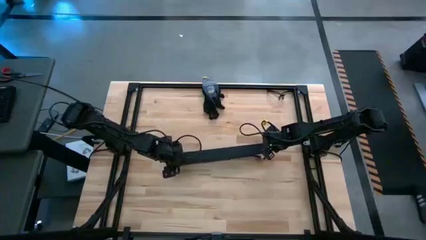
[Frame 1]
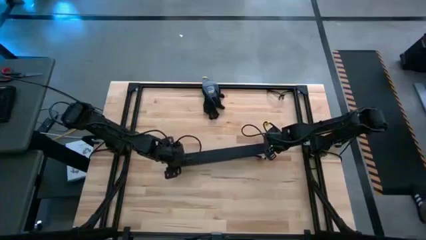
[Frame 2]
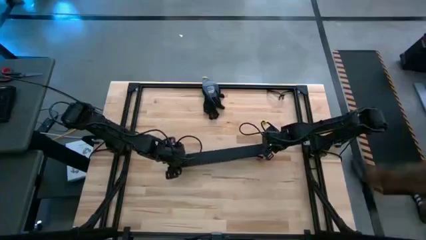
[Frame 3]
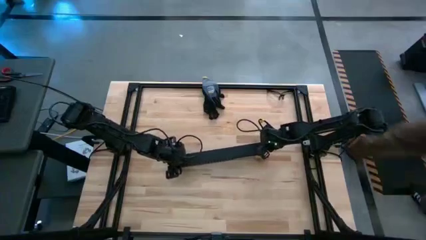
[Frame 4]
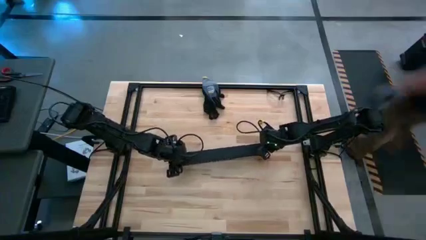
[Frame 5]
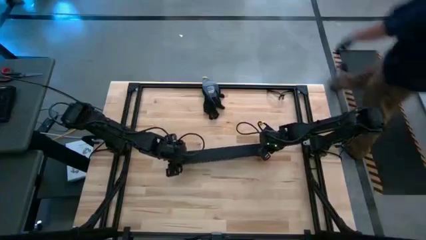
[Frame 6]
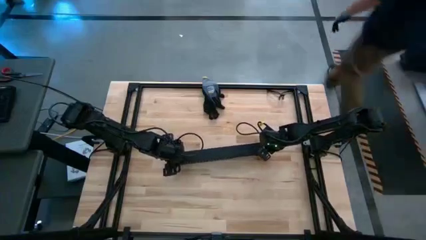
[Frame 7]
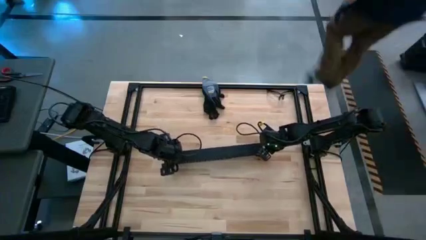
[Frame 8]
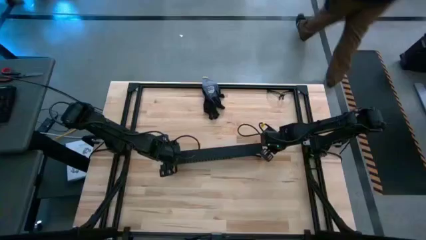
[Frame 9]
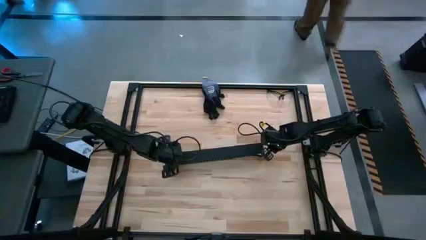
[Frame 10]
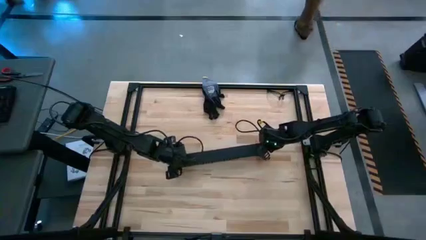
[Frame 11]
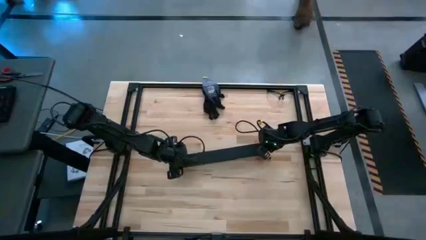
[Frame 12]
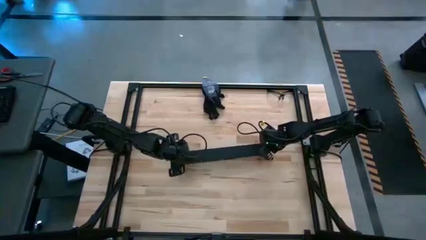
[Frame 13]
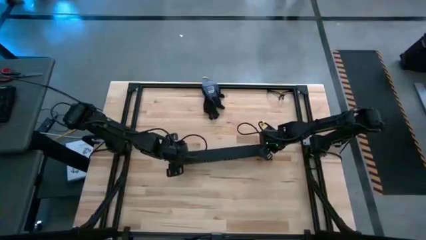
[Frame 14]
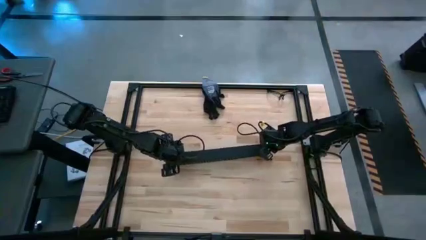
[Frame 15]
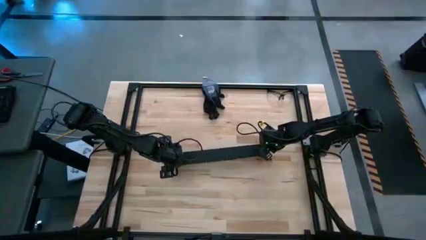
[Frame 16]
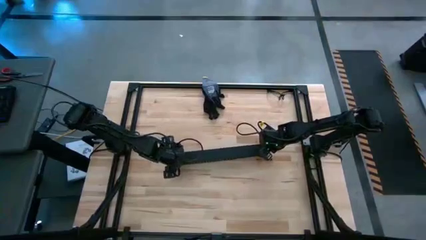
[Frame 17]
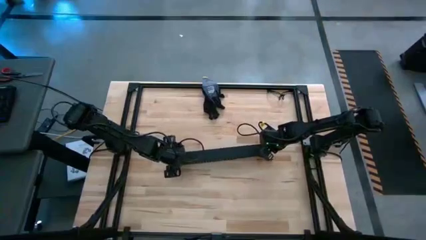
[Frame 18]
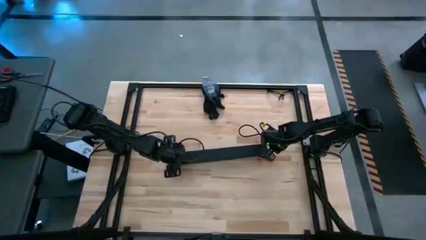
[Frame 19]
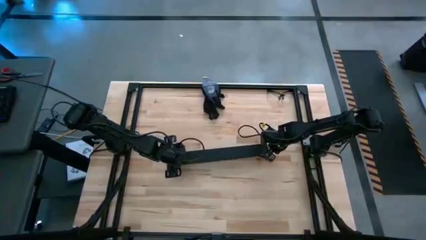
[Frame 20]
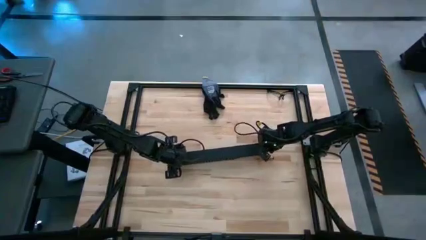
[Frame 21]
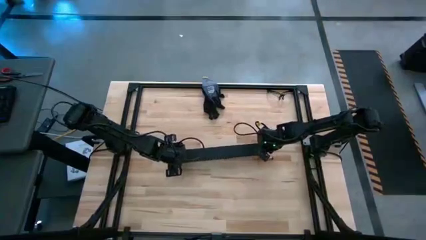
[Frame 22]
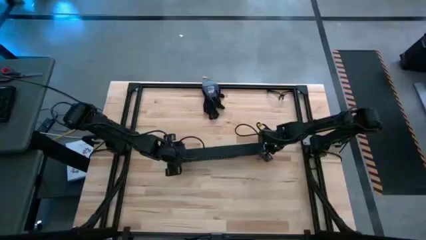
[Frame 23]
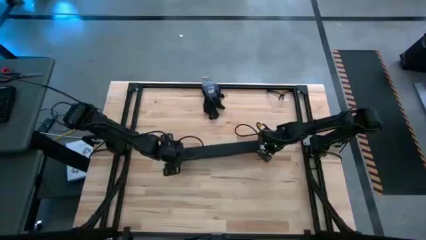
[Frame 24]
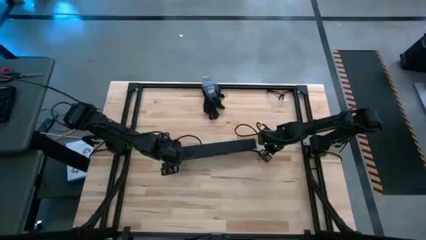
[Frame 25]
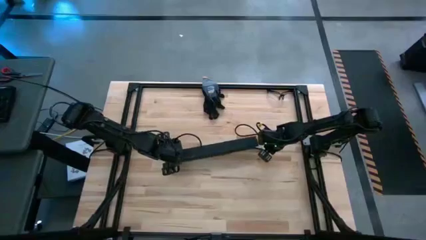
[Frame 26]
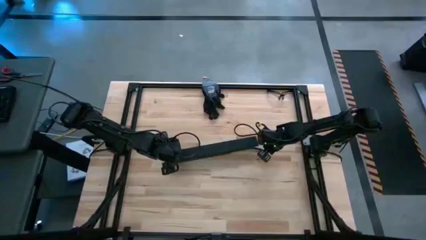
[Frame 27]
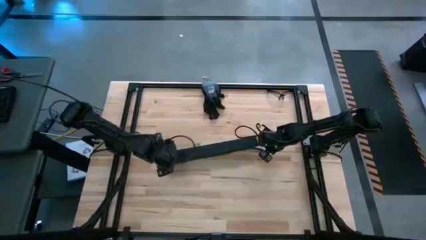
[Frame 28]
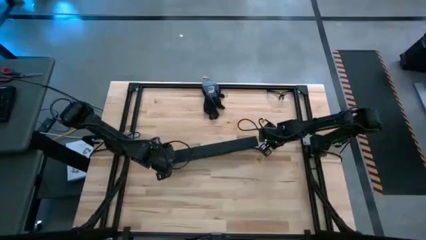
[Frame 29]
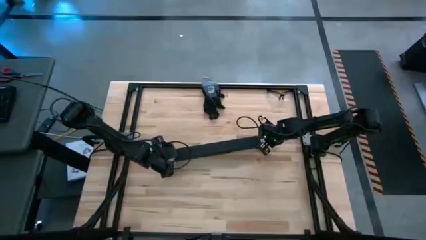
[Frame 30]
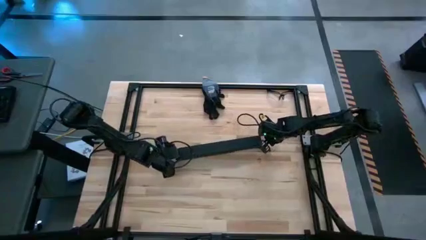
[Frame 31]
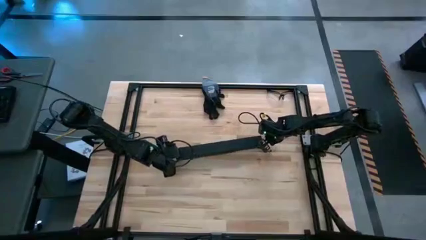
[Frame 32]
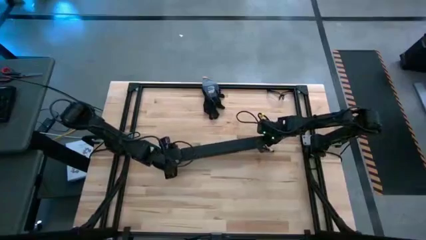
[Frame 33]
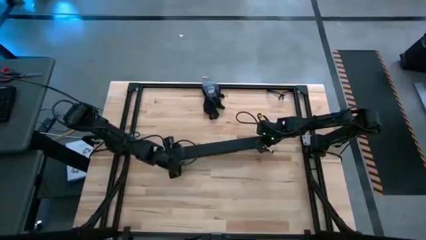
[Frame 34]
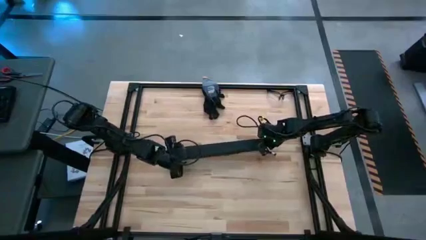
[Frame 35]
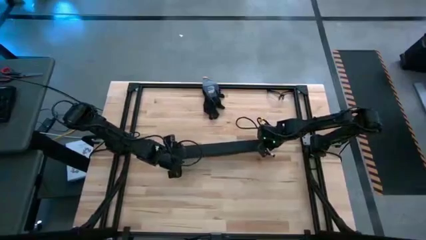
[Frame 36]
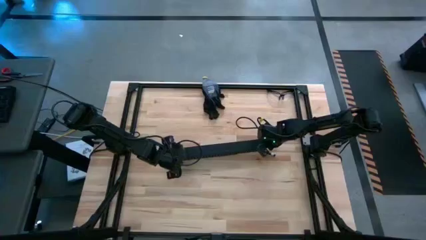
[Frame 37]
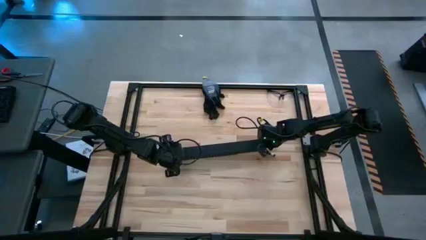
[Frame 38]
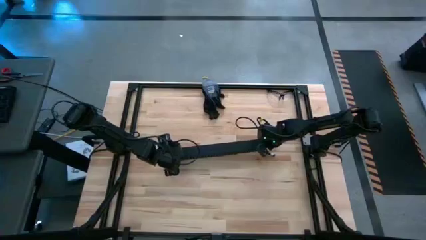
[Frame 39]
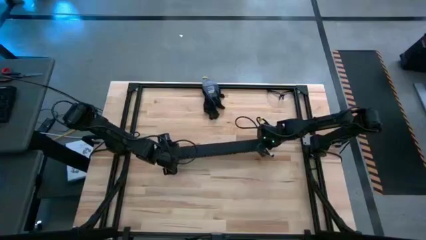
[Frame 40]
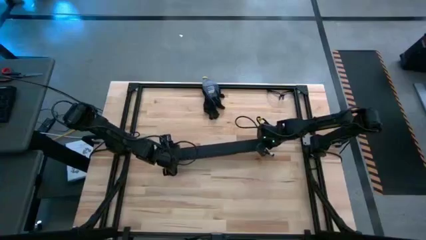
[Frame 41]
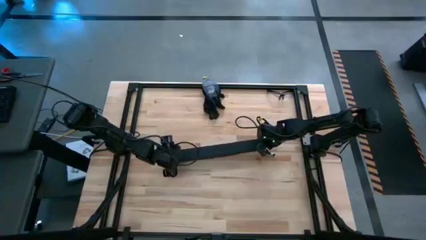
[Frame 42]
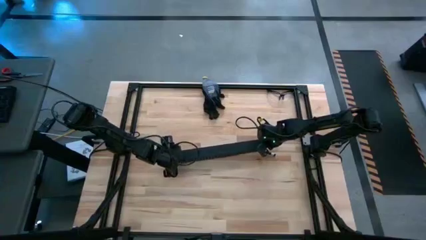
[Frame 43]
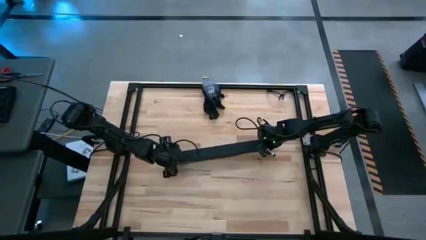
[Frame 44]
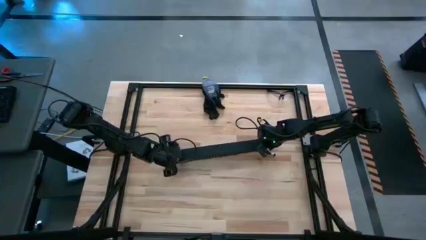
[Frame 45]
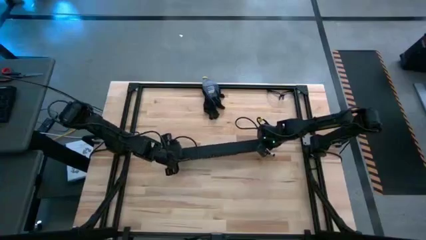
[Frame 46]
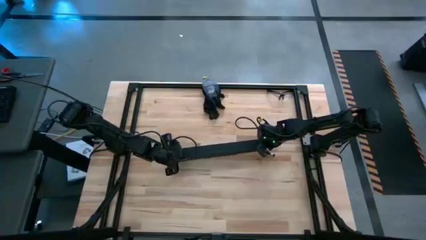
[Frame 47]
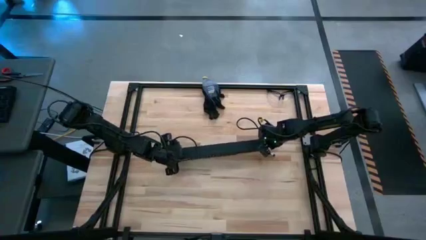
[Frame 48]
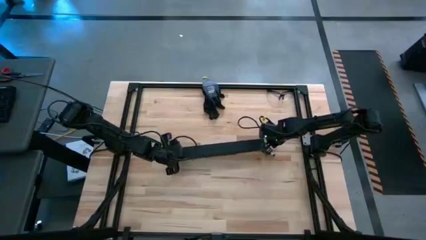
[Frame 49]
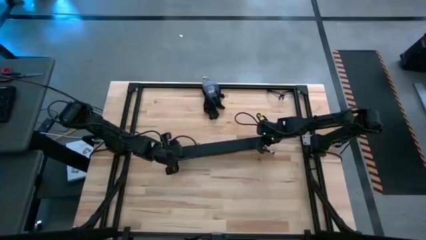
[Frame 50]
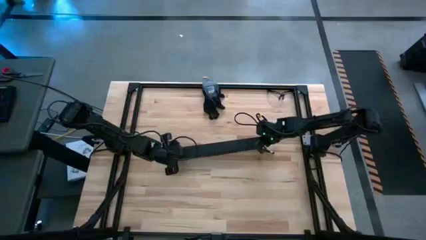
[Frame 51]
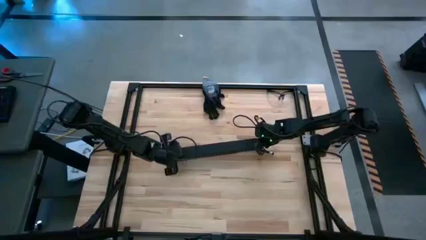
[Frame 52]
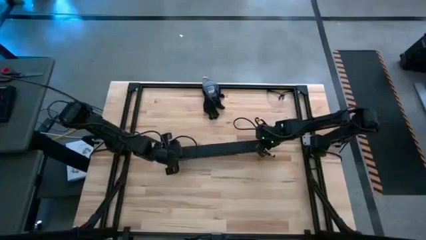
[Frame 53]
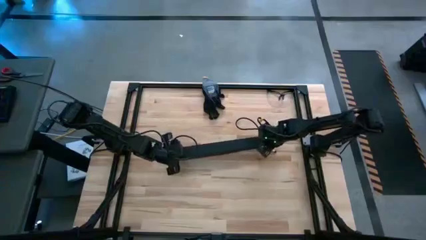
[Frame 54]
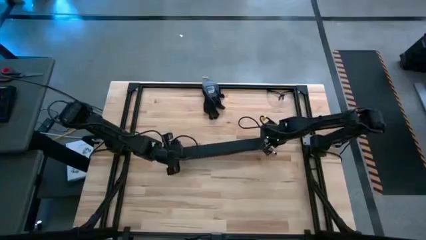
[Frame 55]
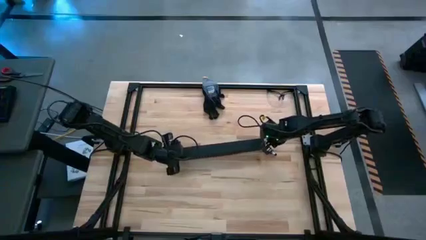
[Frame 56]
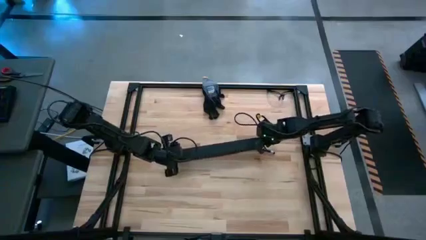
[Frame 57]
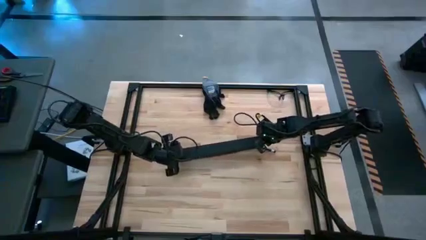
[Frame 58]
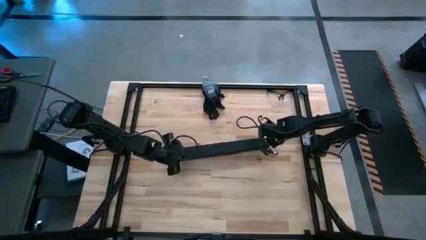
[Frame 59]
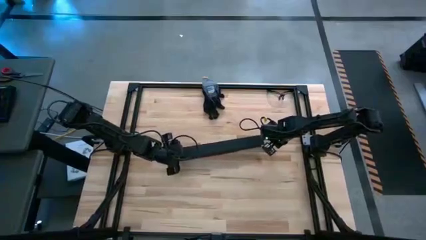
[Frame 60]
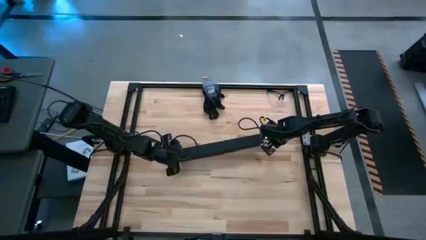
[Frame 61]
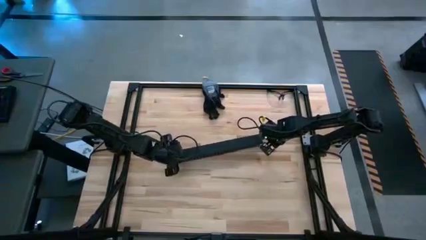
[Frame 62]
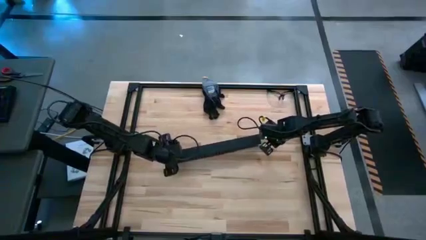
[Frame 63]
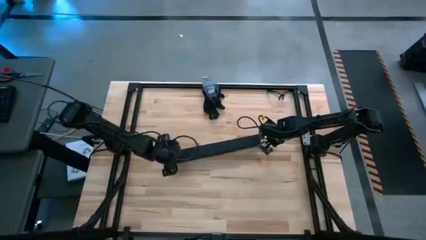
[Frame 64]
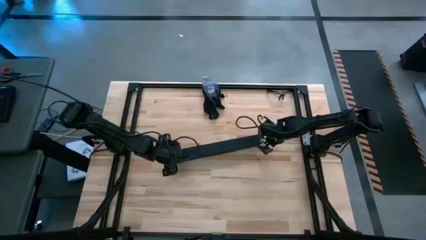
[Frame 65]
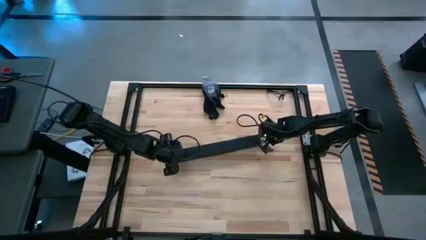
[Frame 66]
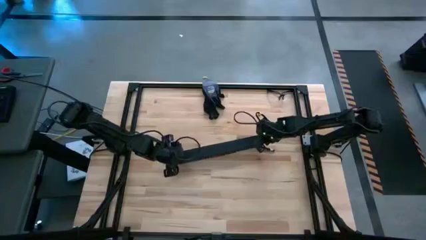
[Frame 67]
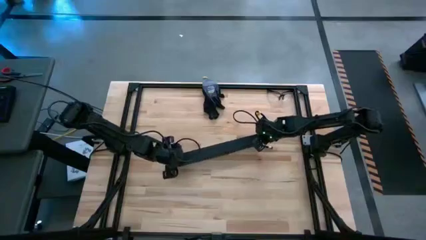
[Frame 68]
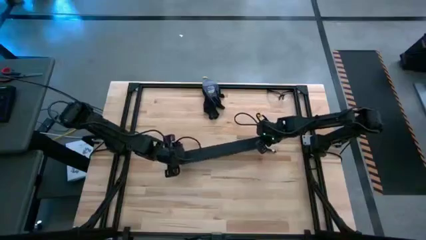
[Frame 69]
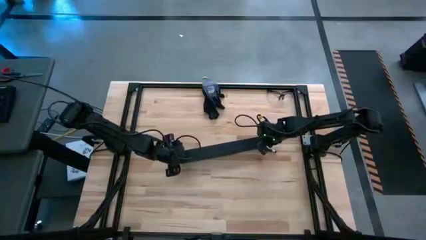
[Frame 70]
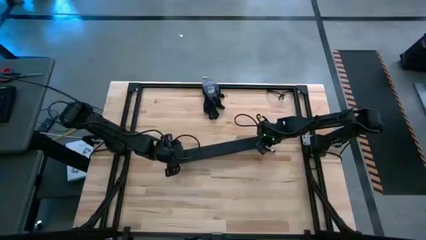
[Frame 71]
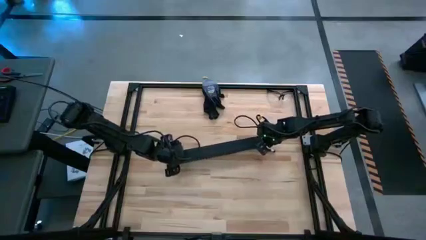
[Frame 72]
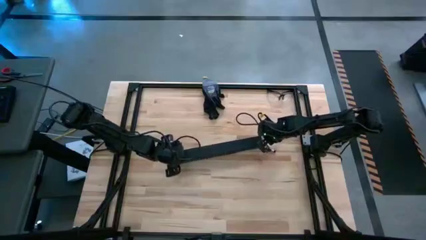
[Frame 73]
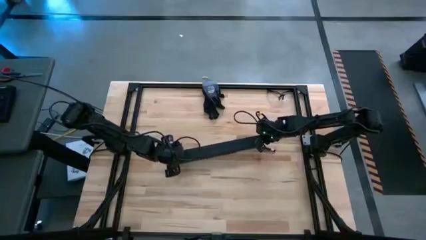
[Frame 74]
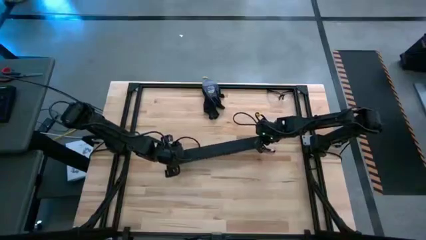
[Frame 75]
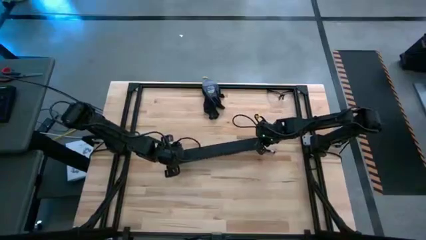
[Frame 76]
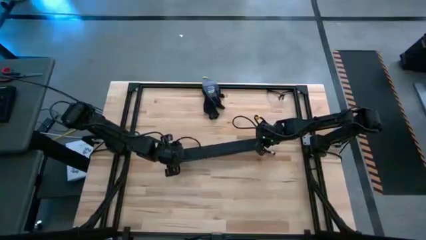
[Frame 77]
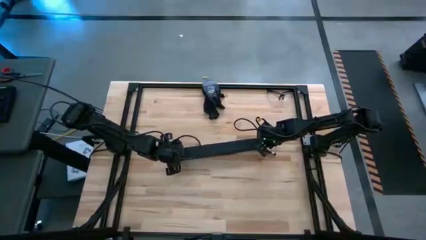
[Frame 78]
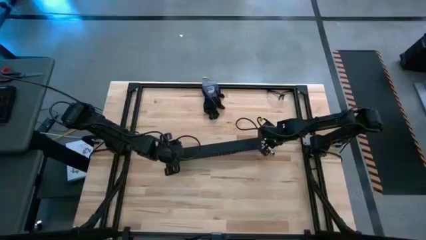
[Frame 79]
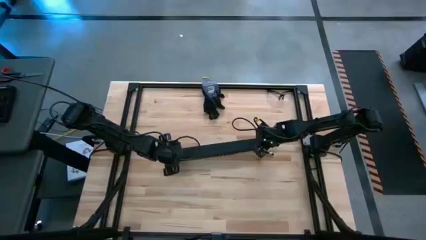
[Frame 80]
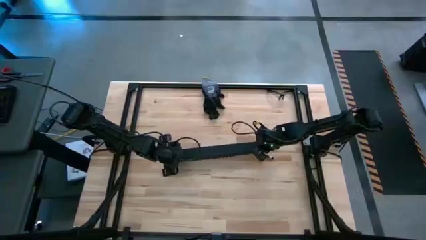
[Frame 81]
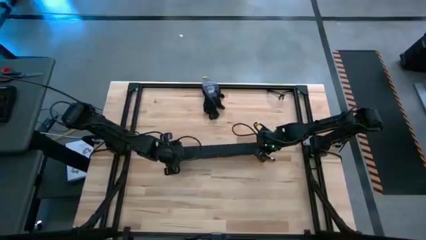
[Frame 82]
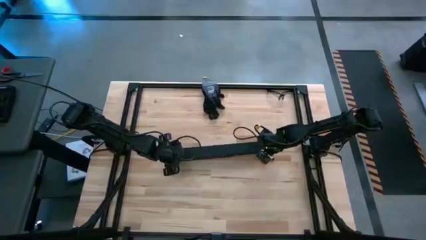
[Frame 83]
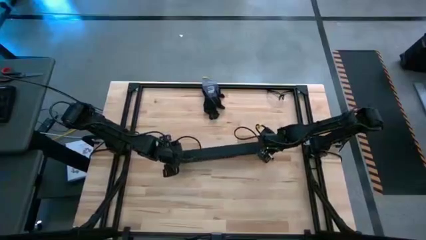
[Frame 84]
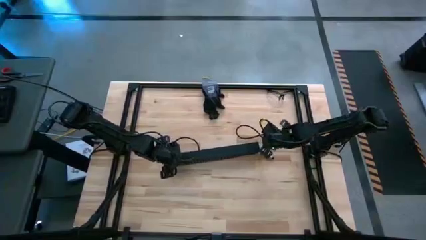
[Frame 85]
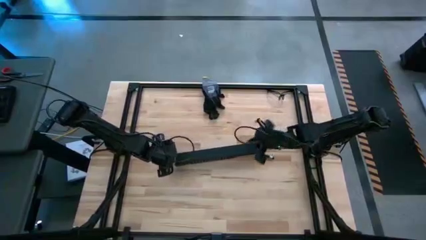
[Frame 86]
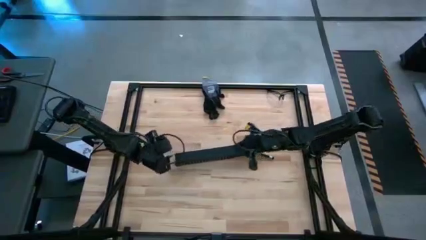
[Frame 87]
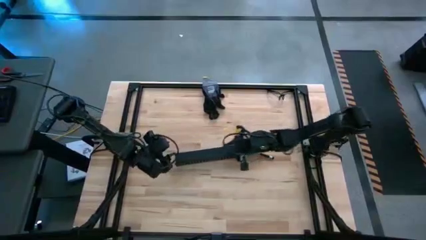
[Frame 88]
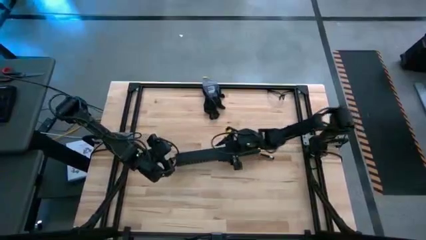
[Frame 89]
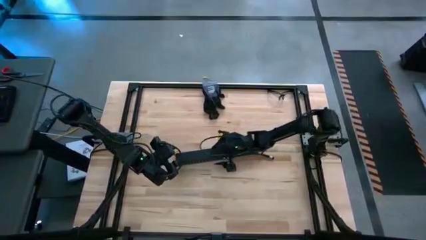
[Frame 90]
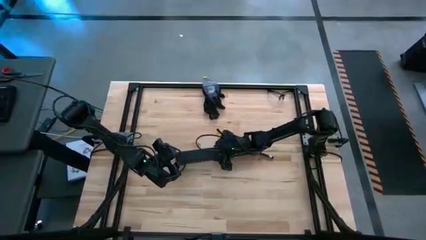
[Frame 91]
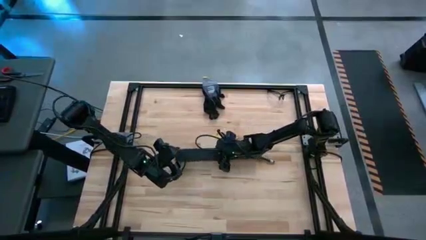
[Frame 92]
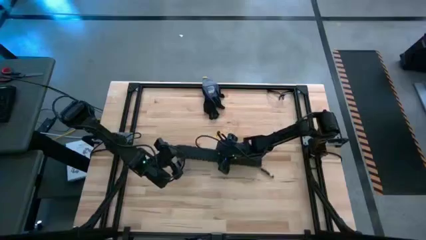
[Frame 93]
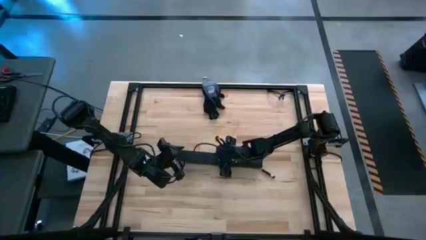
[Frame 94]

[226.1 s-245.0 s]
Task: Ziptie cables
Close the black cable duct
